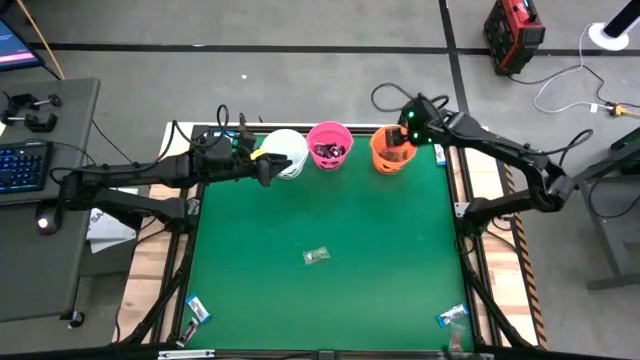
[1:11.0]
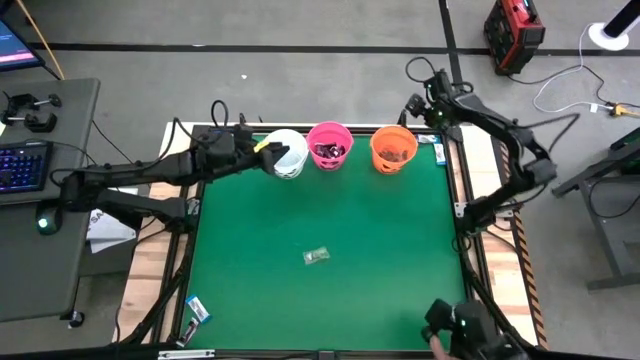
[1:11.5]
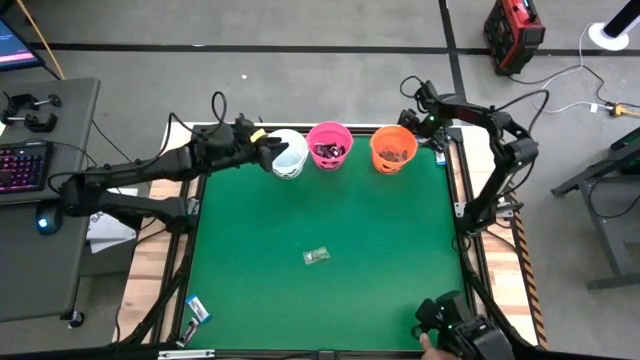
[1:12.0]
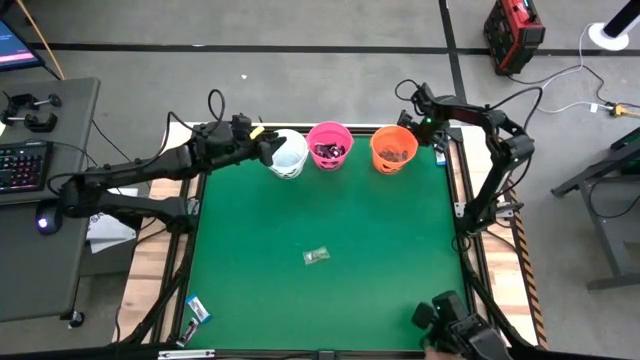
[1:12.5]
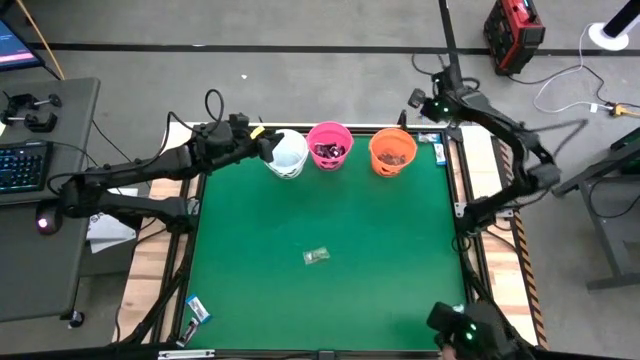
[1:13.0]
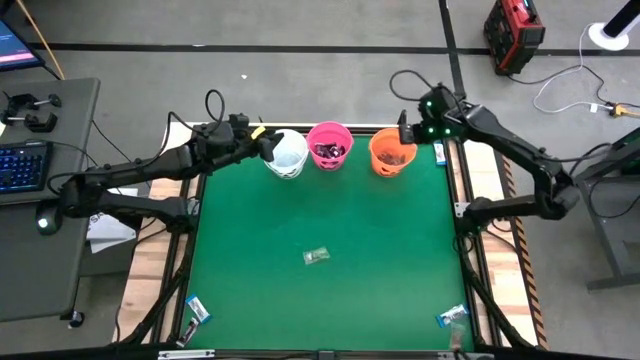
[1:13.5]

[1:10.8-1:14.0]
Task: Sort candy by brand, put in halloween buckets
Put the blue gummy into the orange bucket

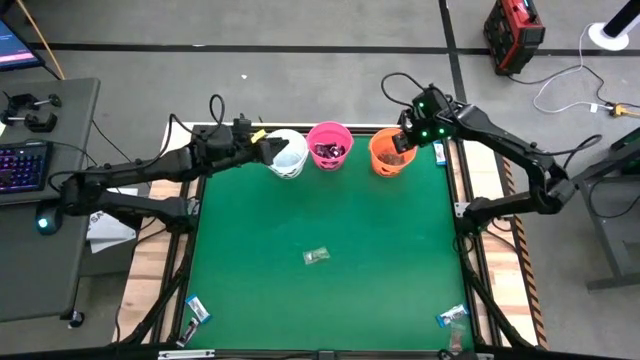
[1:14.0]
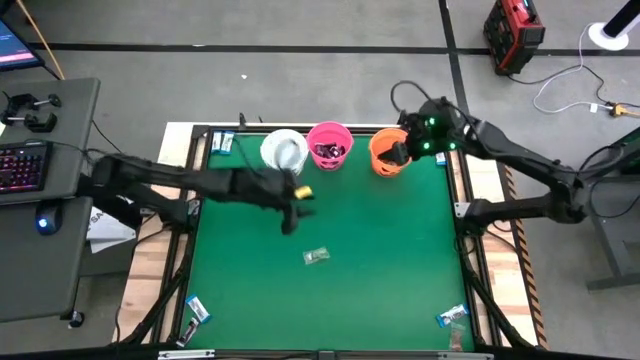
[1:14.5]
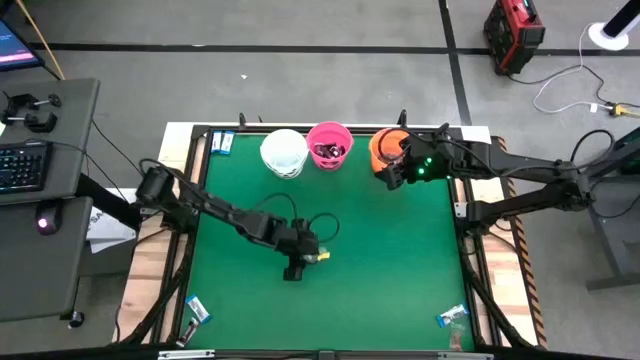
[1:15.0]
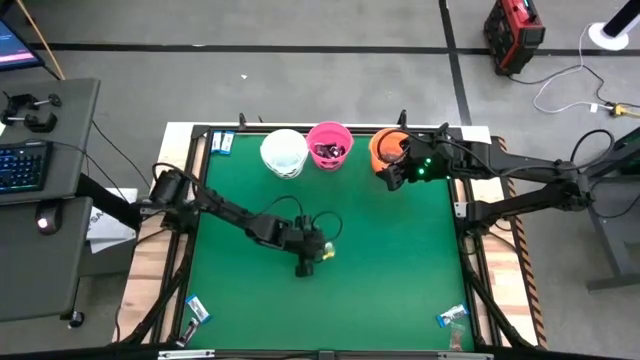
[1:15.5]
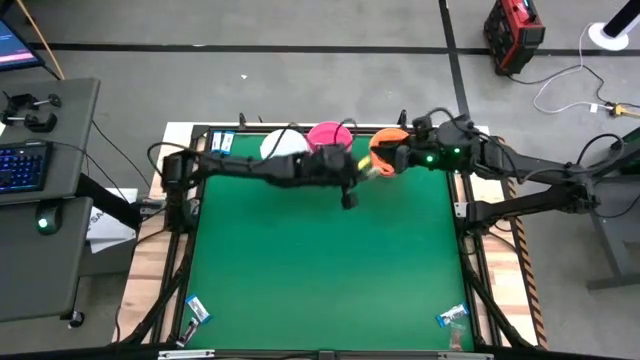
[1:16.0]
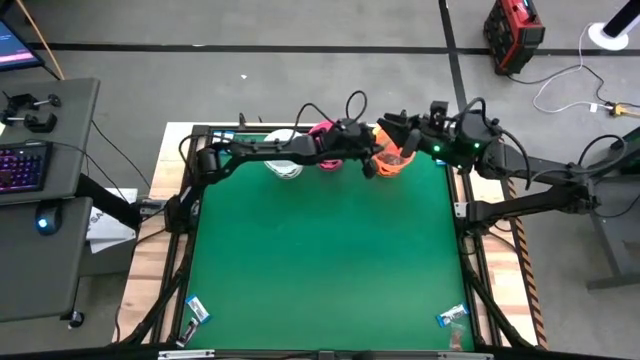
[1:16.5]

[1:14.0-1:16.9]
Put the green gummy into the orange bucket

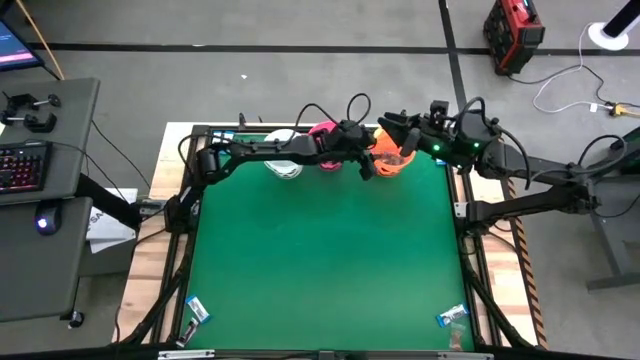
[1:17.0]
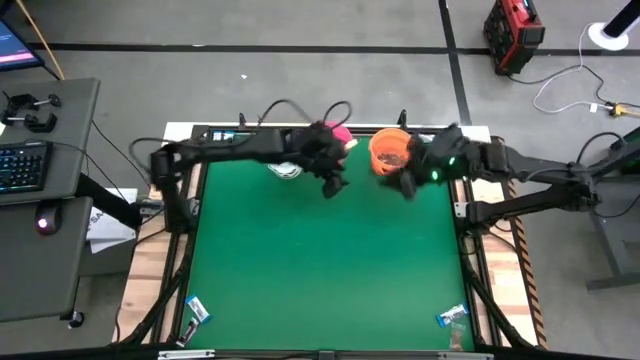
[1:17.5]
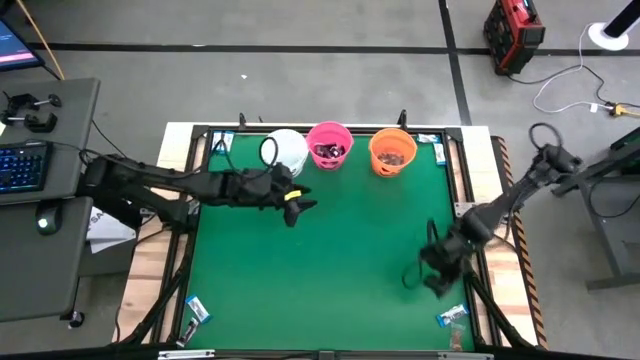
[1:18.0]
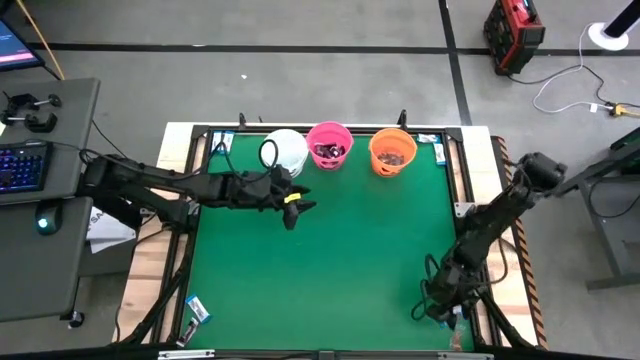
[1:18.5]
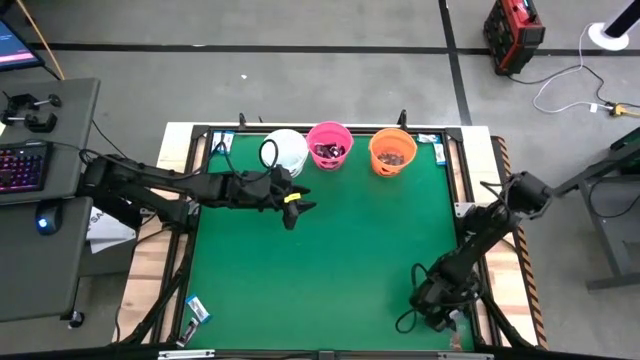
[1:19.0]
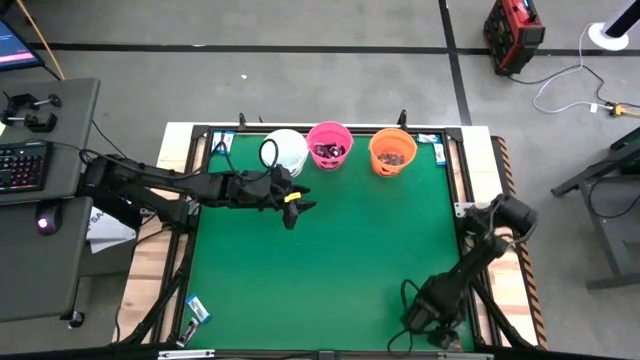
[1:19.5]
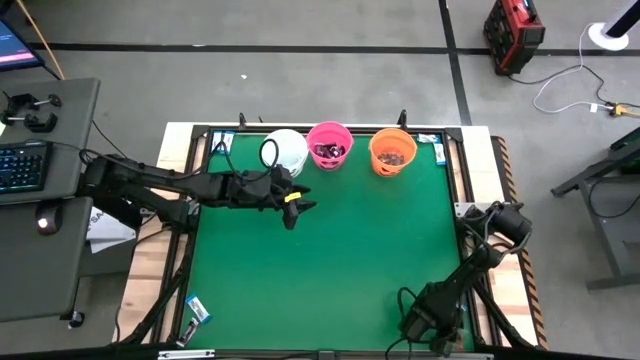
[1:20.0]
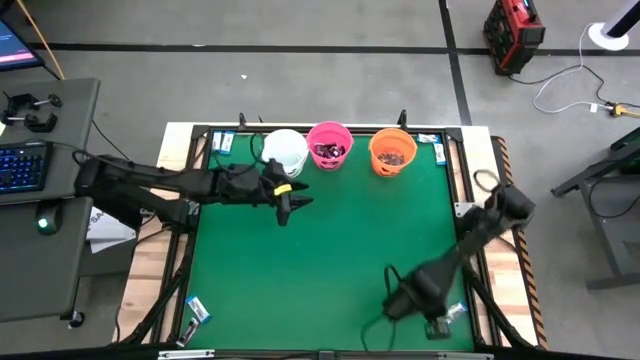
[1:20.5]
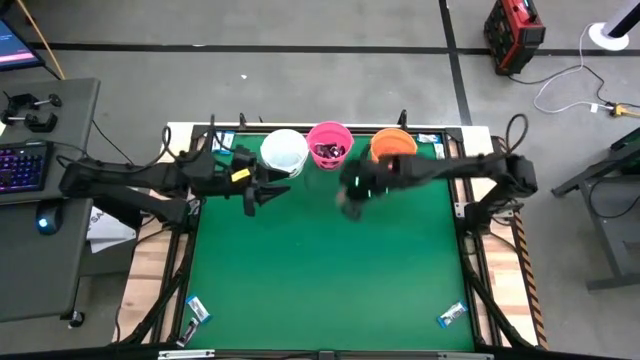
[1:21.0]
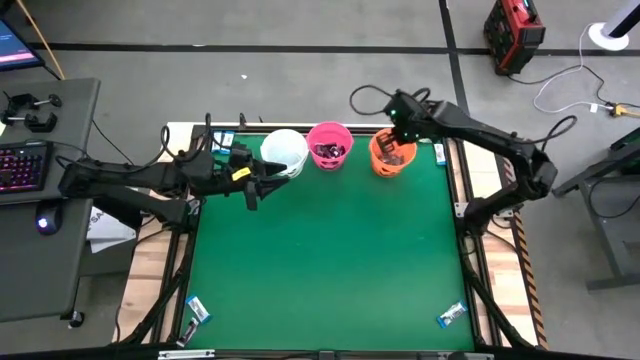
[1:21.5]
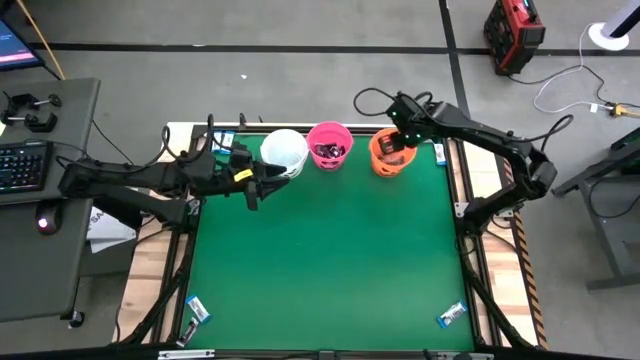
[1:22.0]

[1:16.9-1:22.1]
Put the orange gummy into the orange bucket

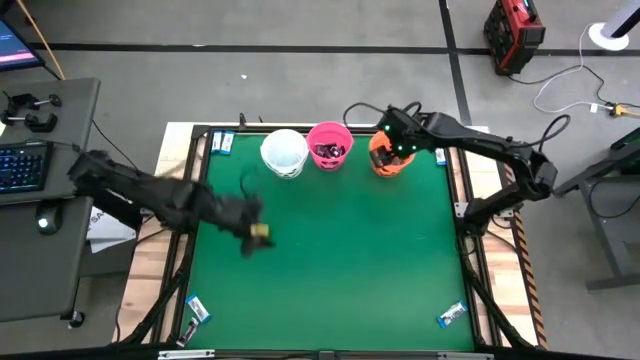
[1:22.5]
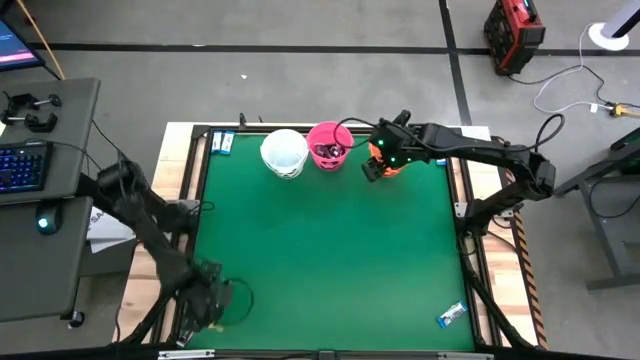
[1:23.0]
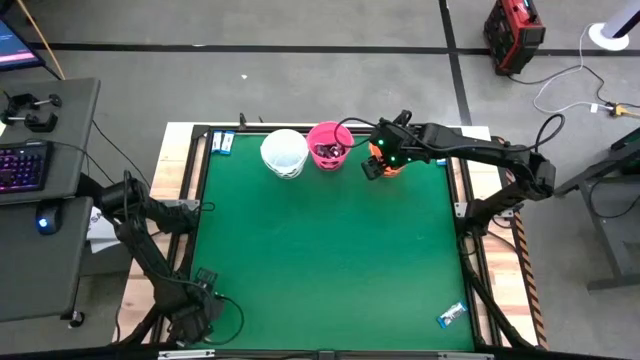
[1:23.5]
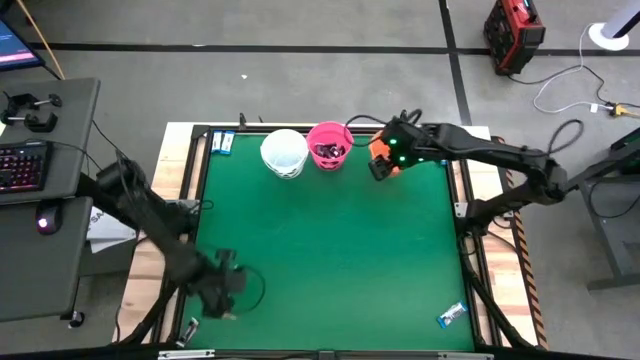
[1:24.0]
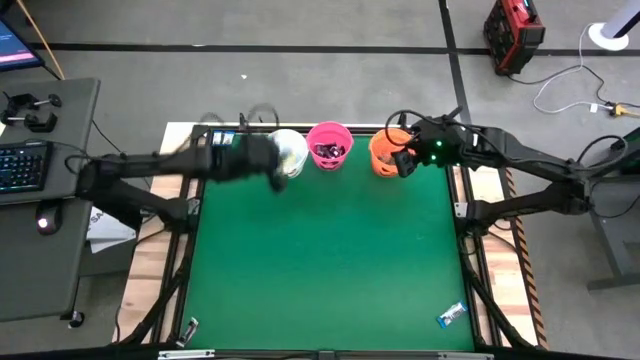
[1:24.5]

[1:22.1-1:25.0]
Put the white chocolate into the white bucket

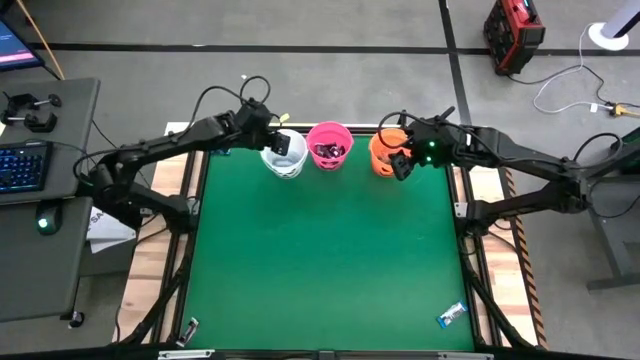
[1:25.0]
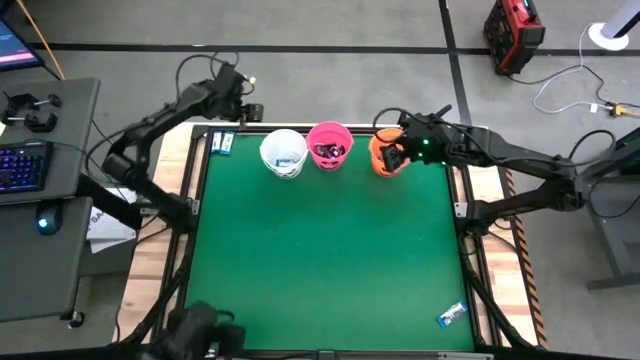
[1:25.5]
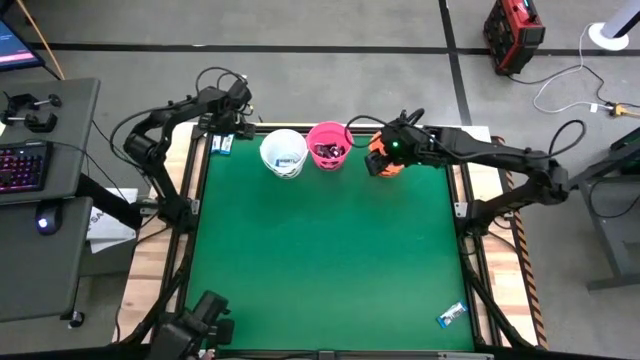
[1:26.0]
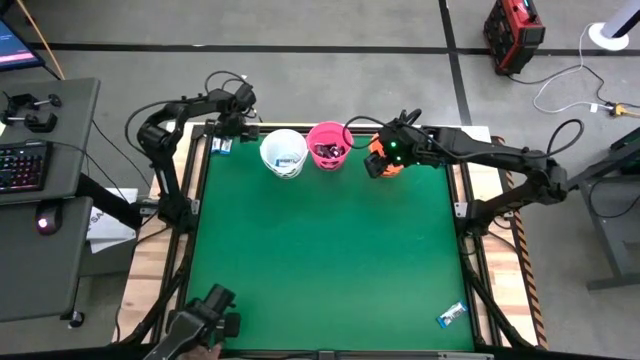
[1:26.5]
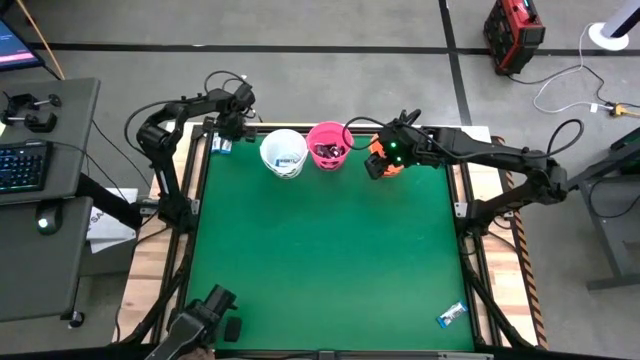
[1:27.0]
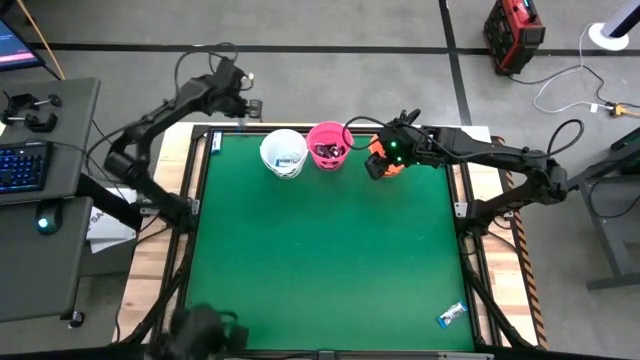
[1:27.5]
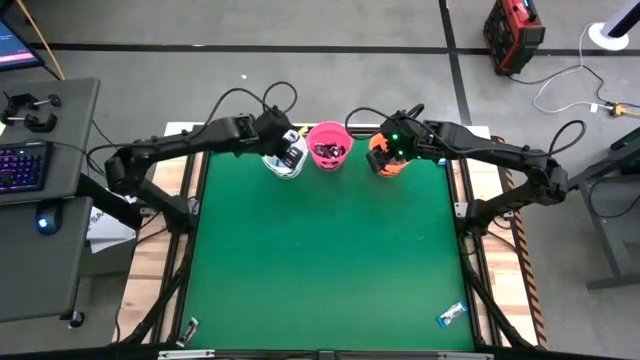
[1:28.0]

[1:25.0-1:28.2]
Put the white chocolate into the white bucket

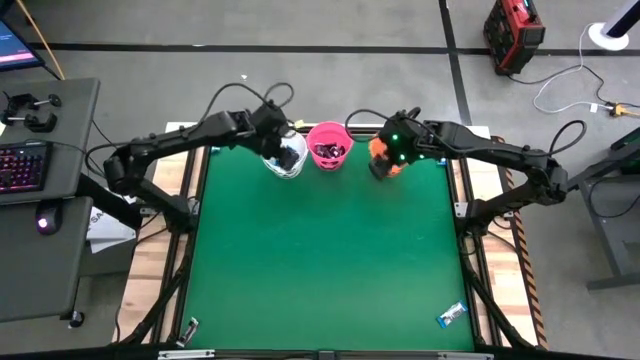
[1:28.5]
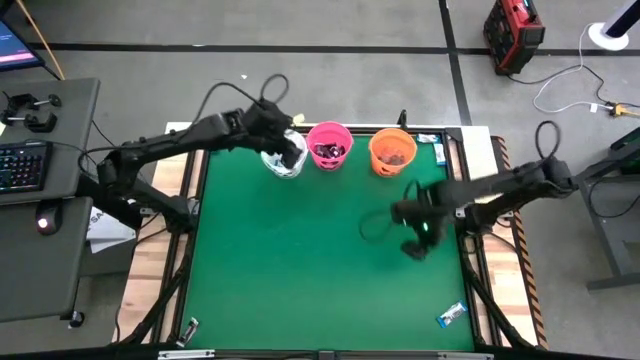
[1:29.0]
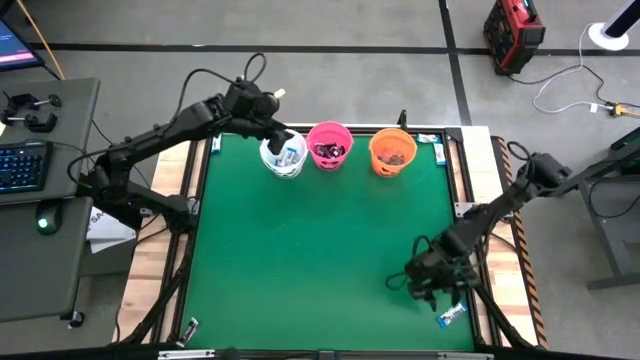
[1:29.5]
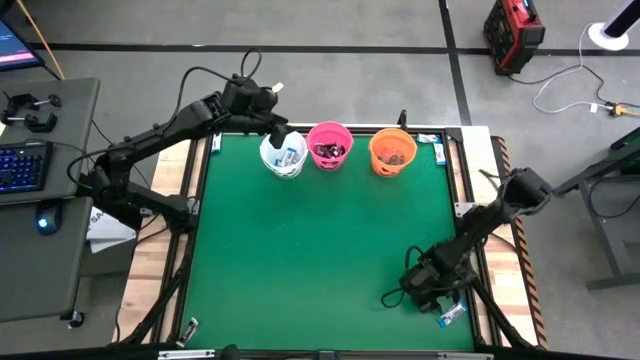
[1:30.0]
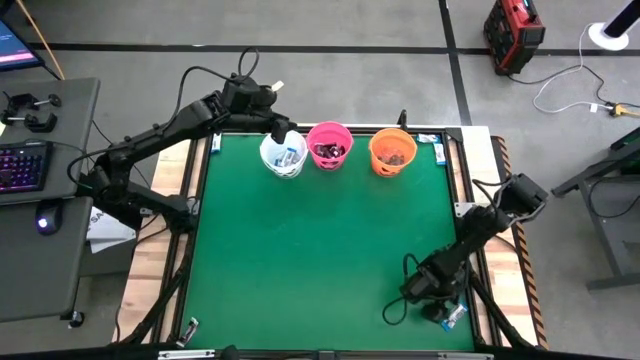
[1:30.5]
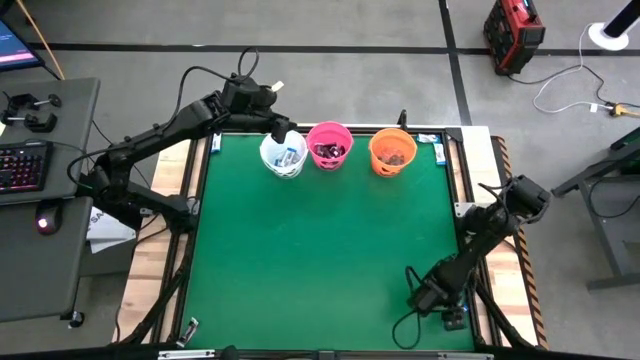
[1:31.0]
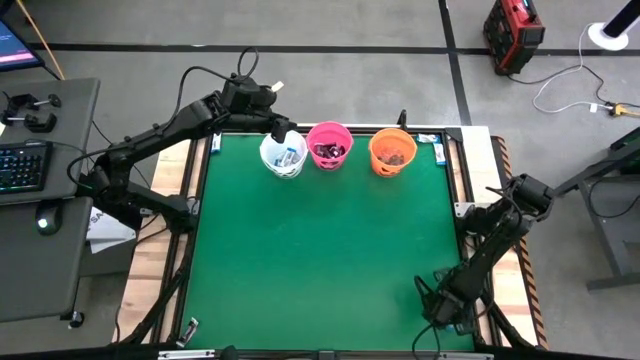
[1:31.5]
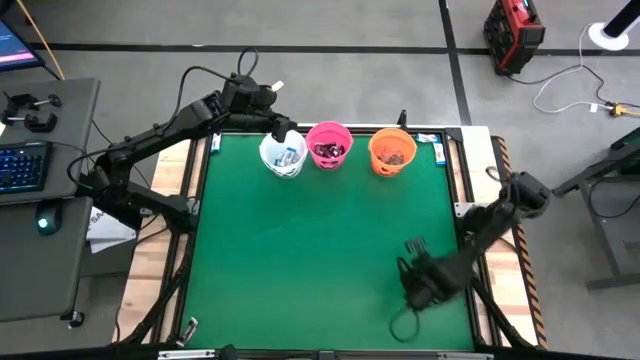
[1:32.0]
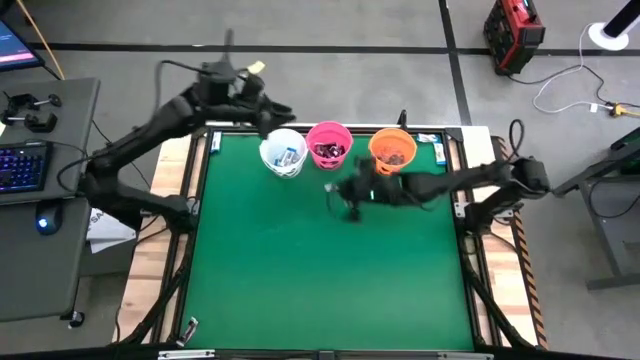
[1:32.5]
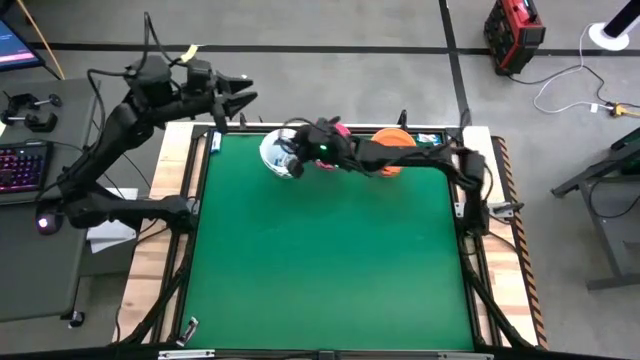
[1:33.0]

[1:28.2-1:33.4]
Put the white chocolate into the white bucket
